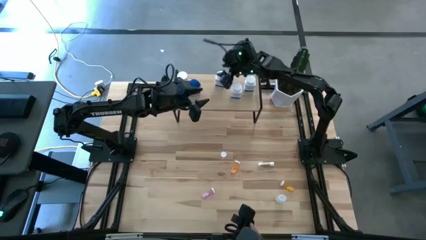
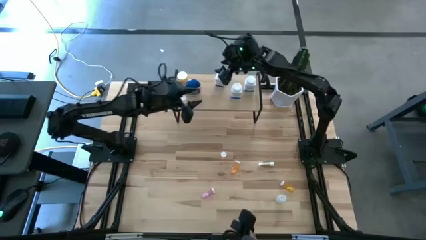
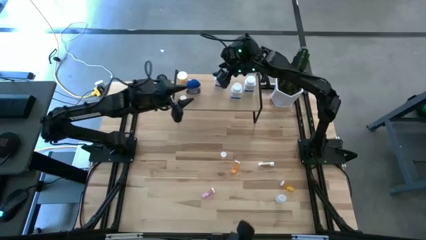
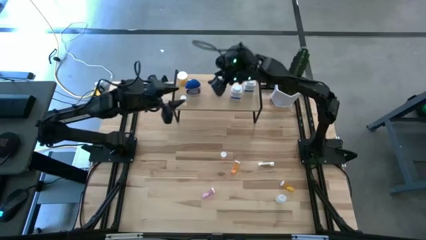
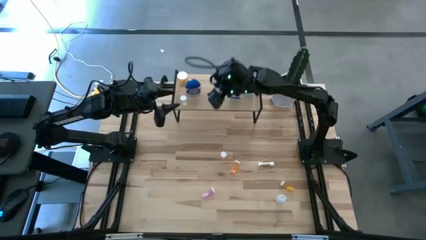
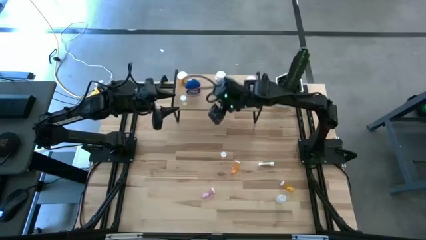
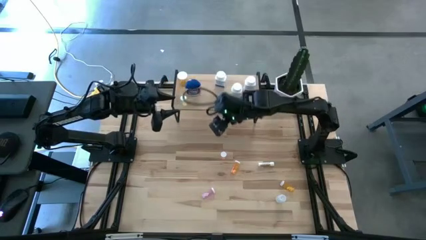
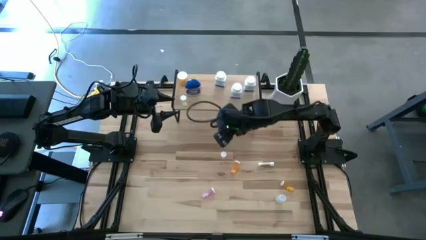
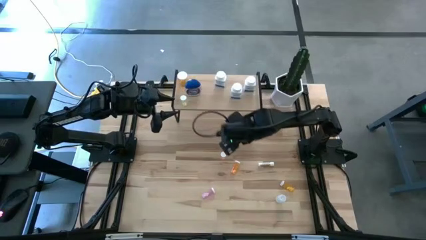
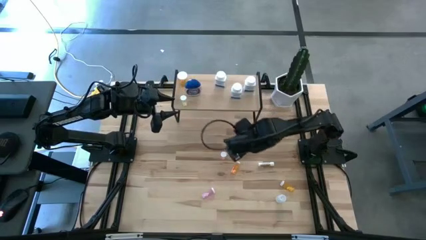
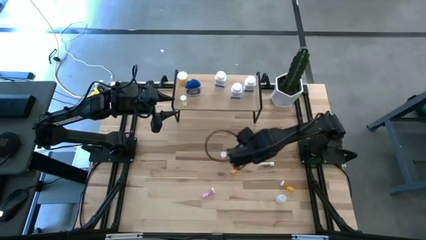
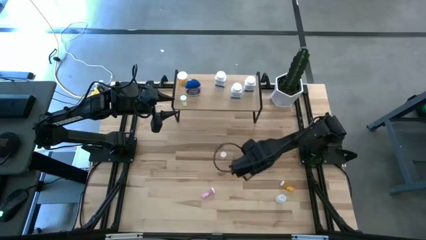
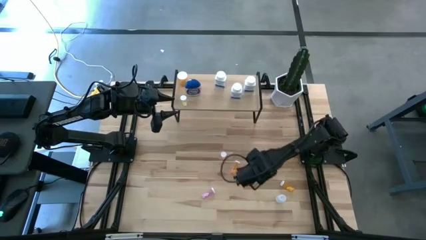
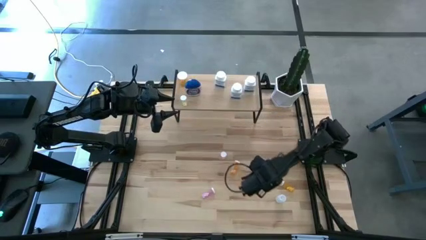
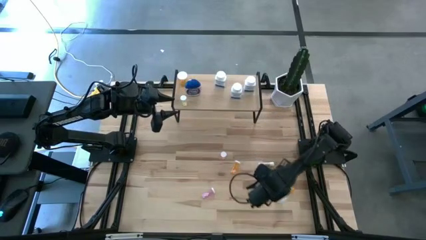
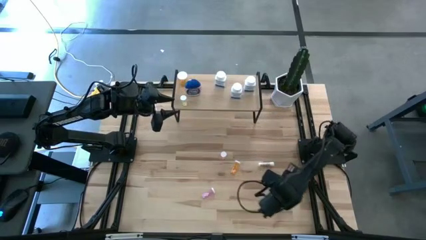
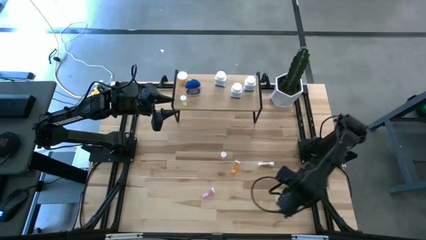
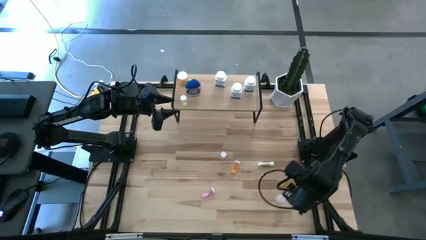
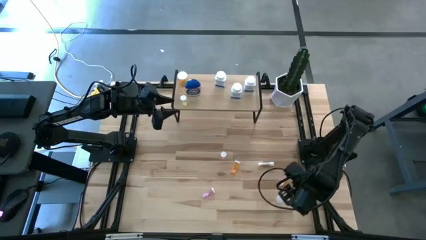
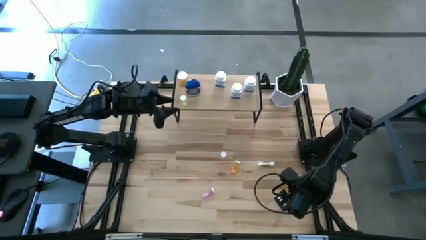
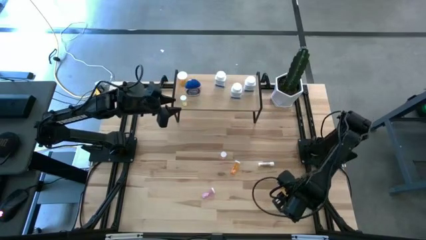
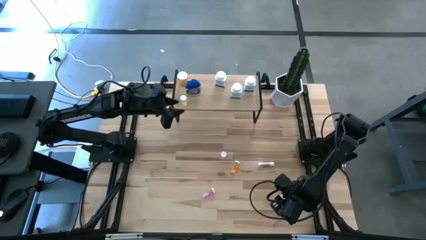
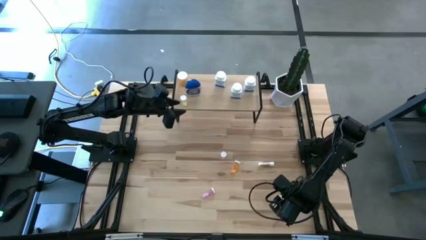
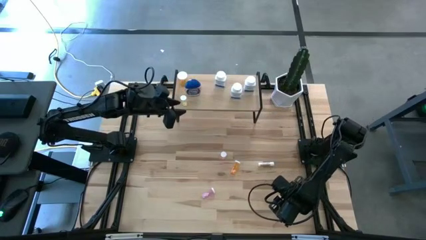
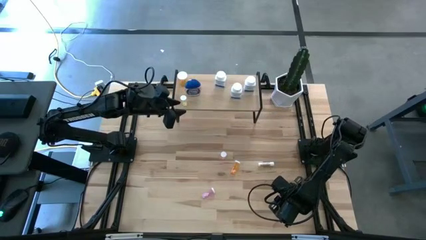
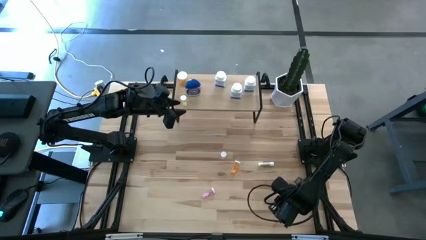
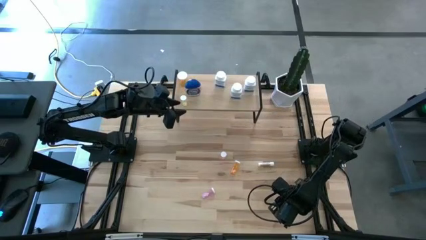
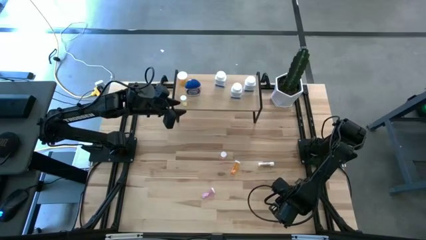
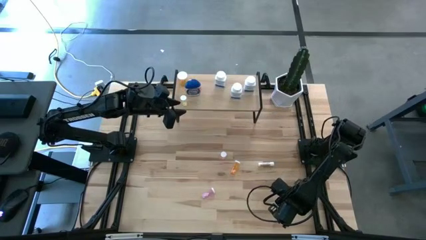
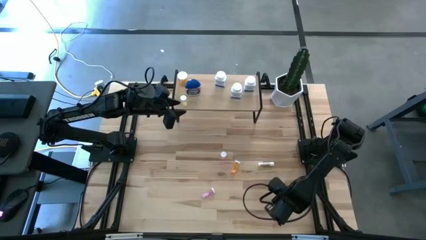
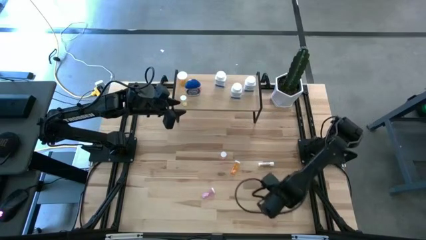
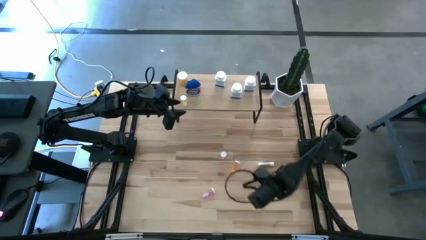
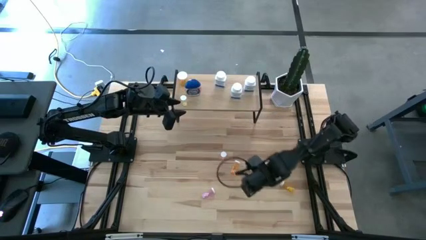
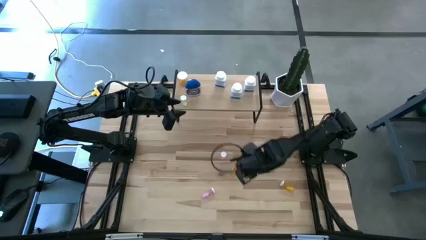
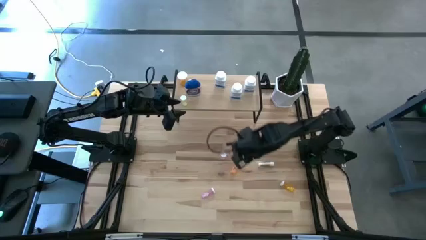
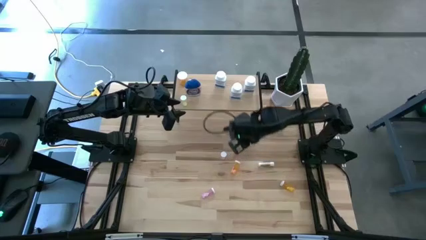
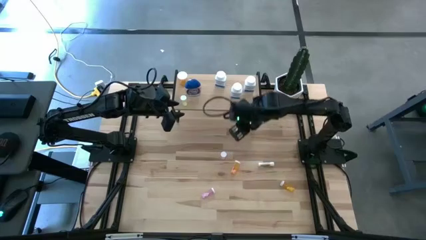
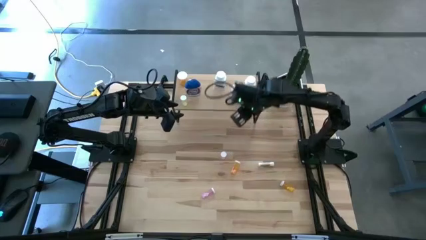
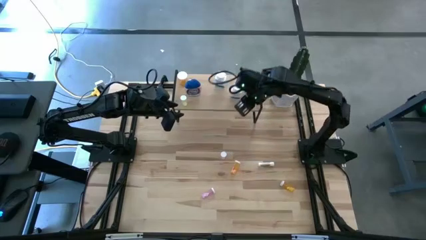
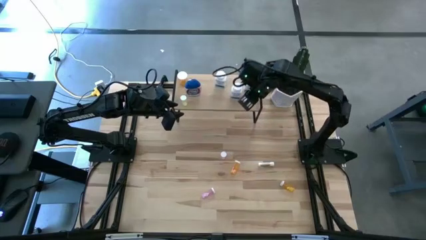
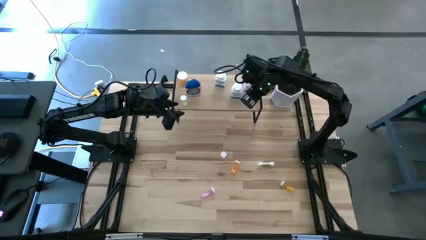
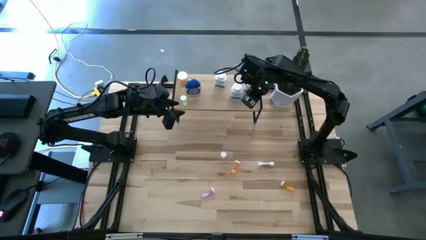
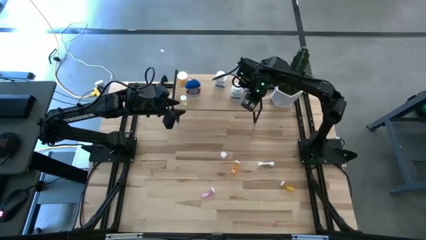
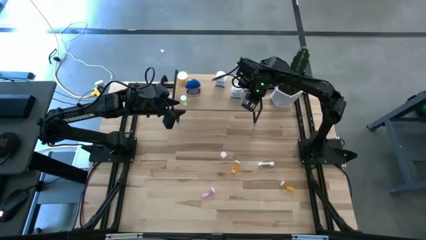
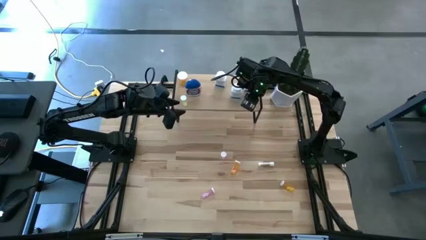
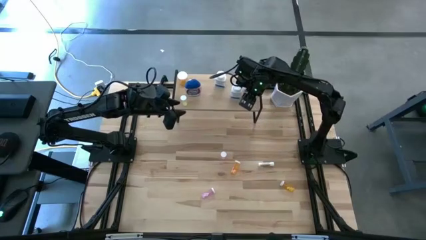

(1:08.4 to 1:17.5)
Task: Pick and place medicine bottles onto shelf by color
Put the small white pill bottle on the shelf

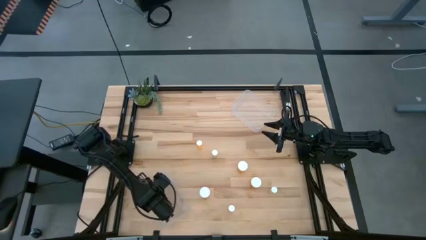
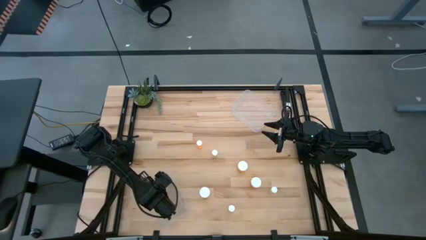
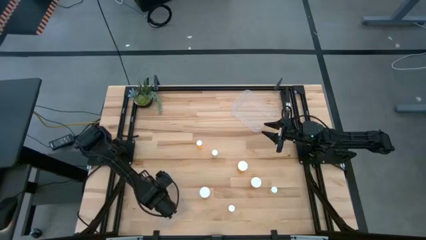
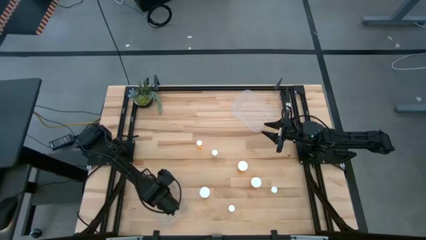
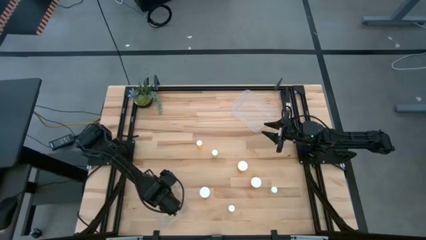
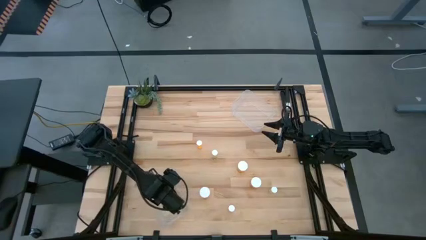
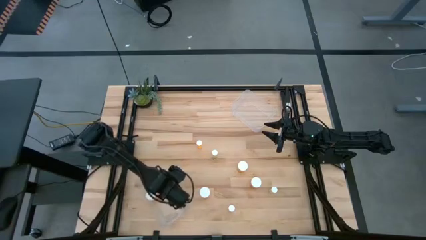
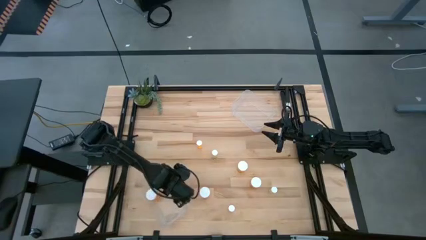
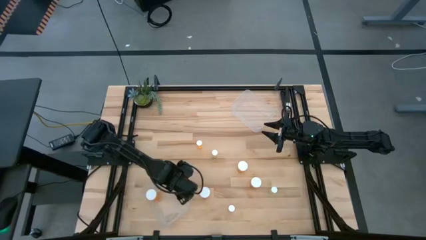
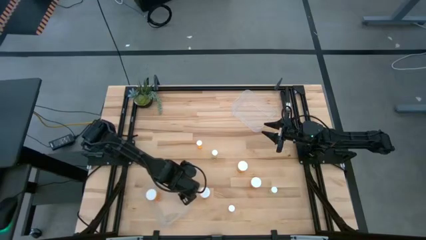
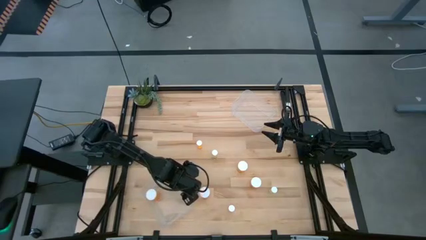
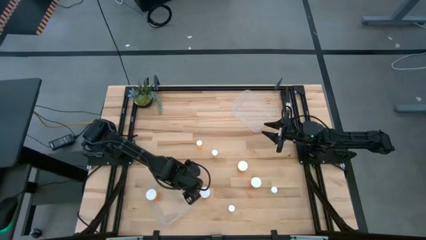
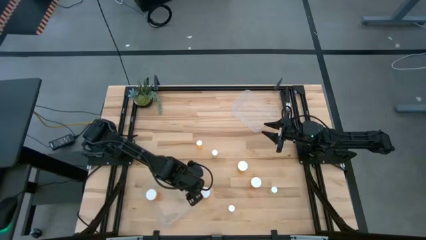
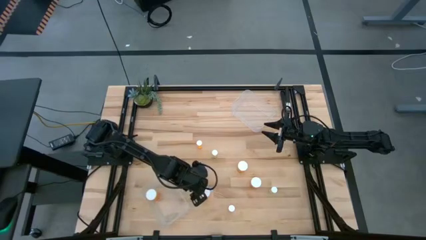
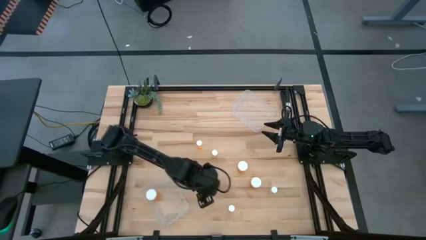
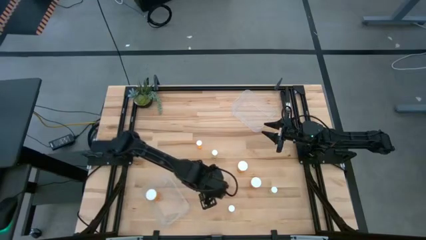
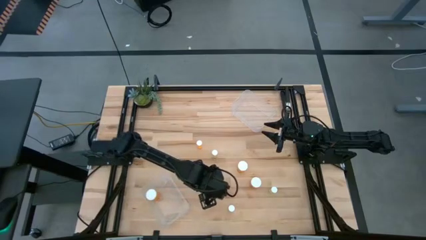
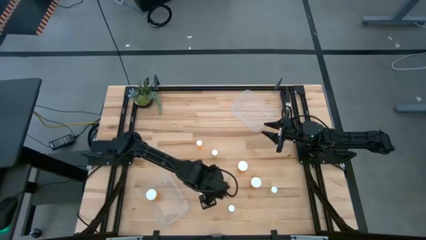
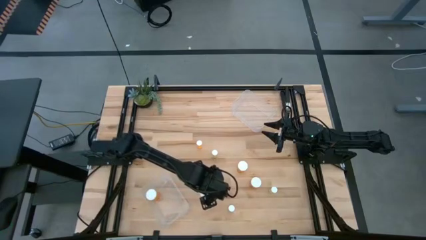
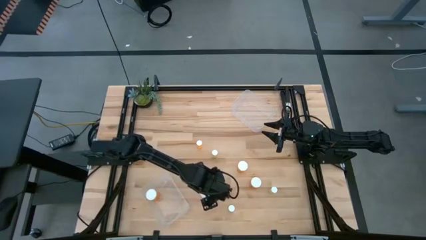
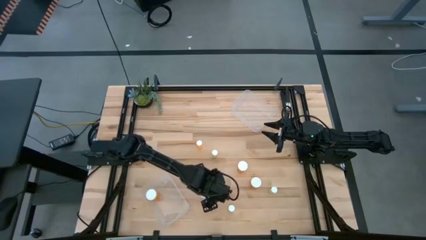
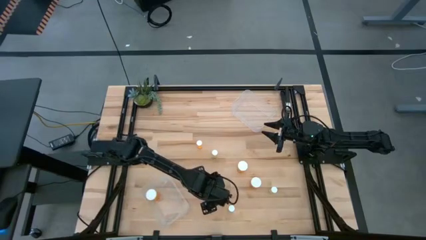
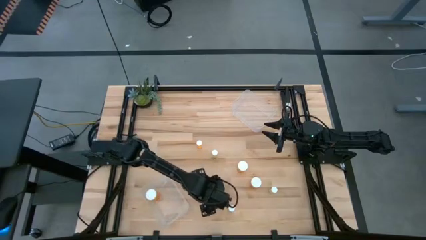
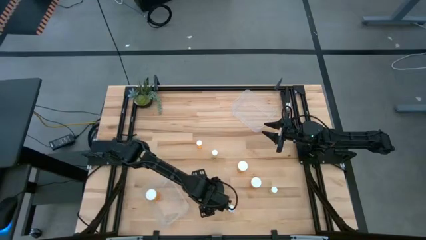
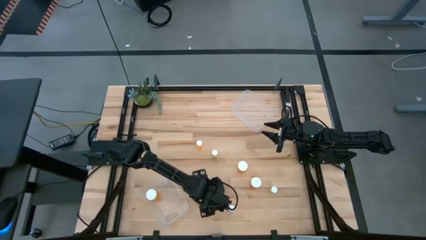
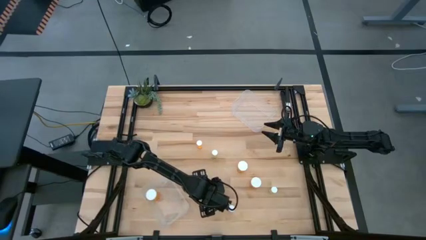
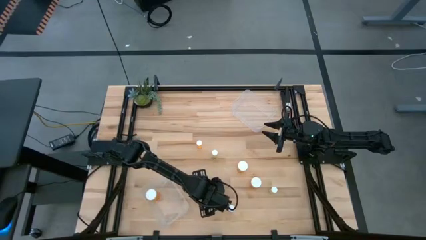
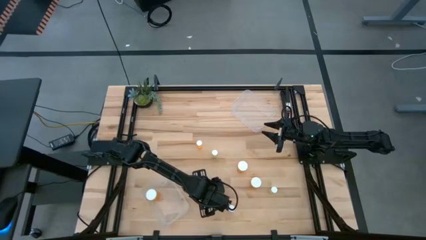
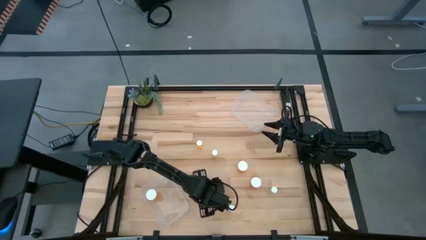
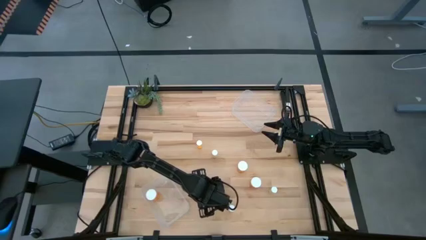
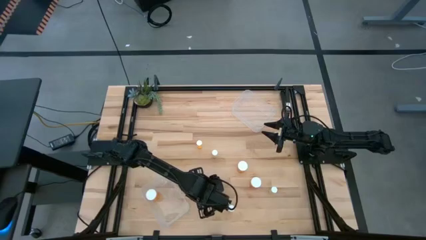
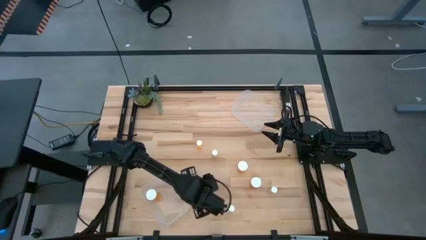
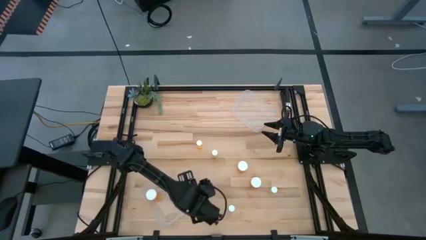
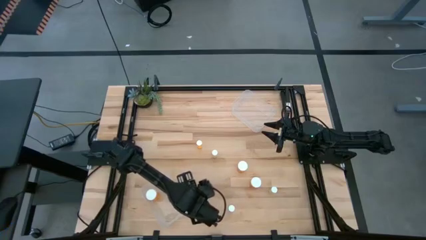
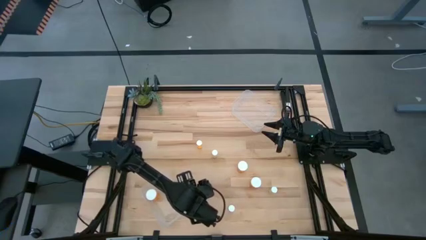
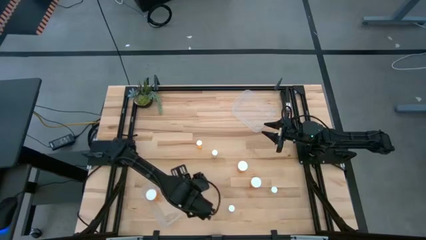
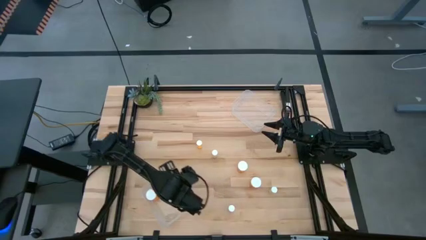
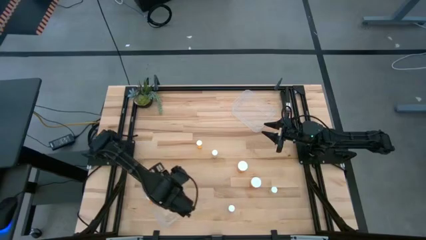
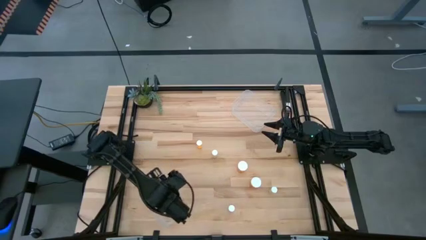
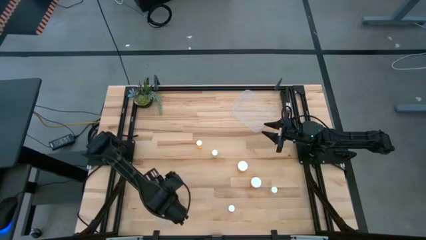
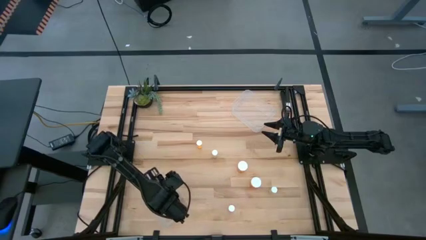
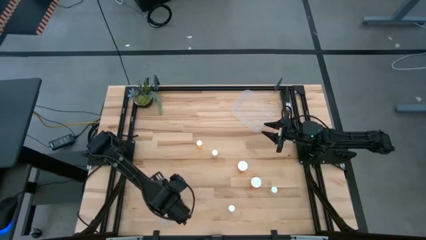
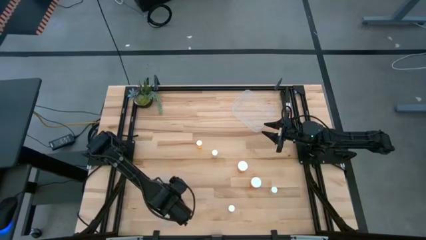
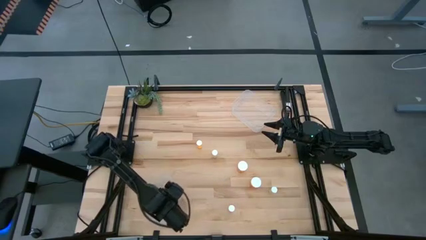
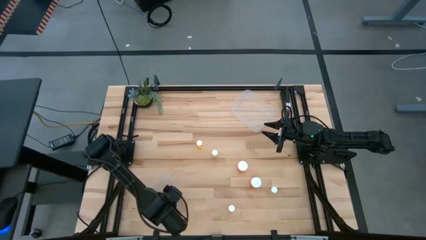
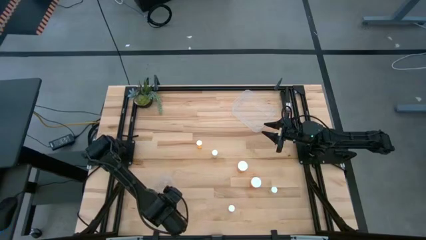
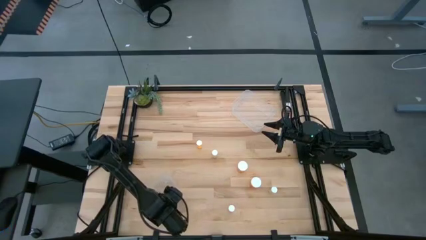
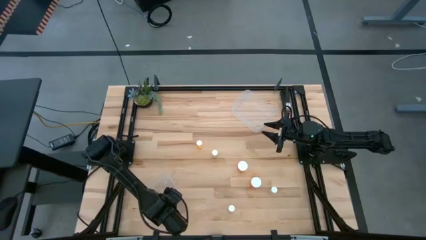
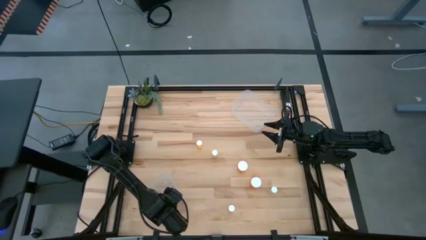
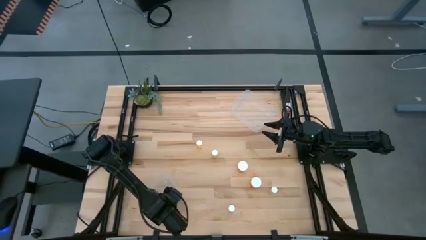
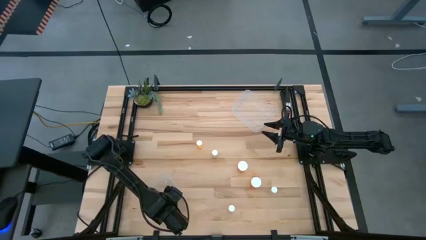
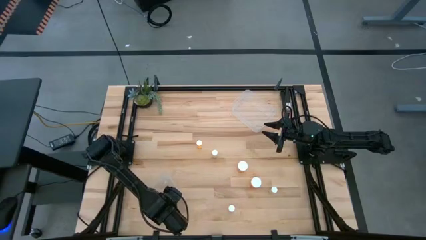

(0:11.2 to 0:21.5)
Task: Pick and place medicine bottles into bin by pill shape (circle, oval)
Put the big orange pill bottle into the bottom transparent bin
